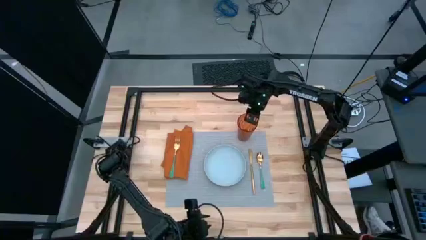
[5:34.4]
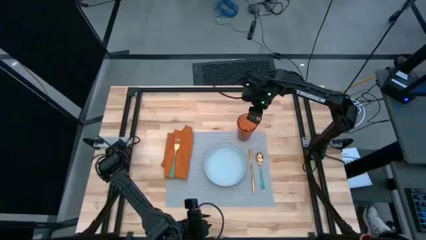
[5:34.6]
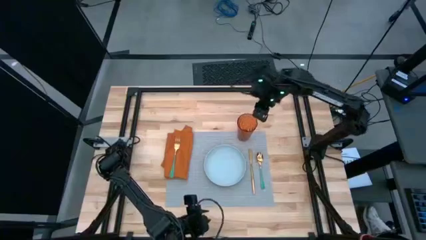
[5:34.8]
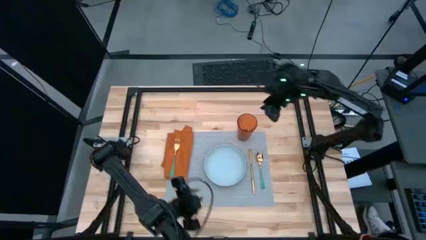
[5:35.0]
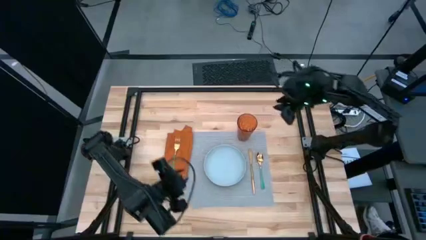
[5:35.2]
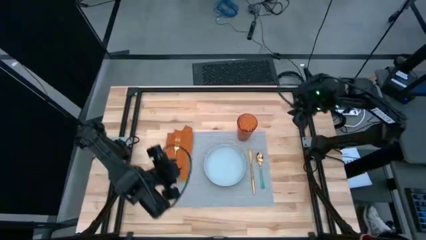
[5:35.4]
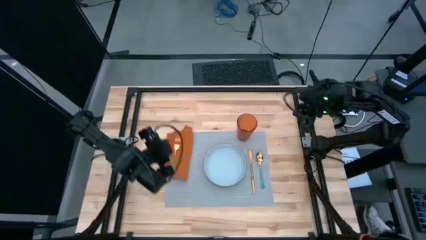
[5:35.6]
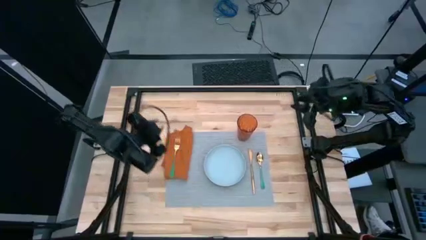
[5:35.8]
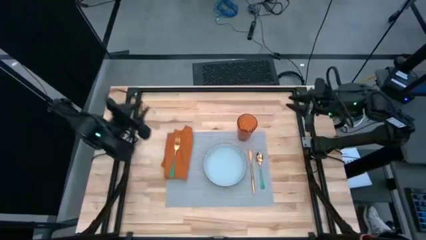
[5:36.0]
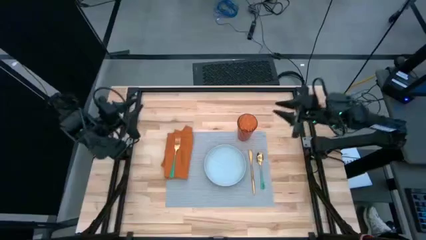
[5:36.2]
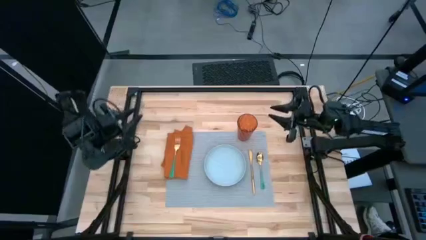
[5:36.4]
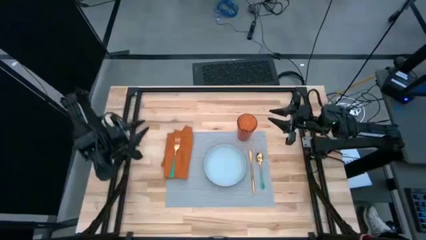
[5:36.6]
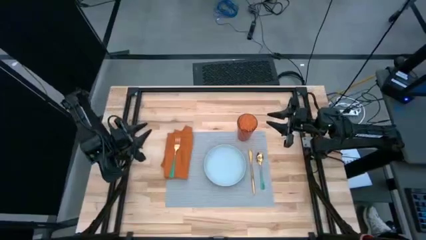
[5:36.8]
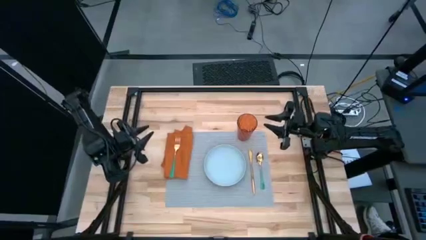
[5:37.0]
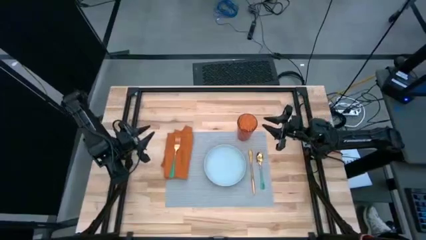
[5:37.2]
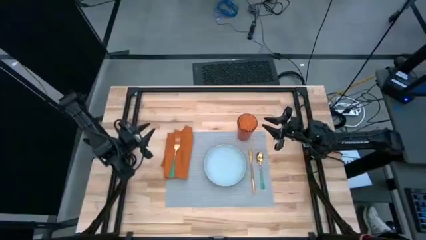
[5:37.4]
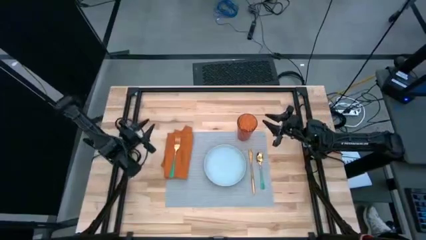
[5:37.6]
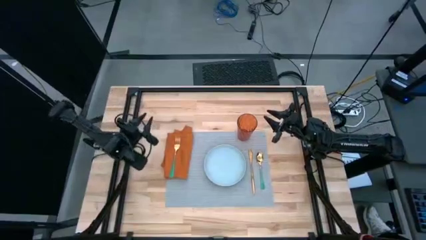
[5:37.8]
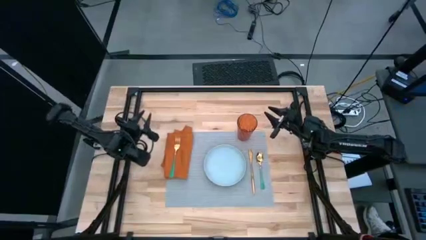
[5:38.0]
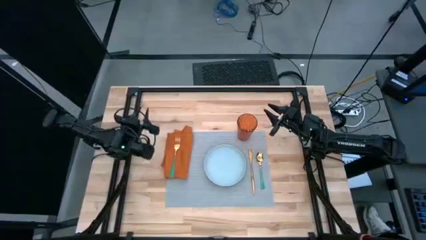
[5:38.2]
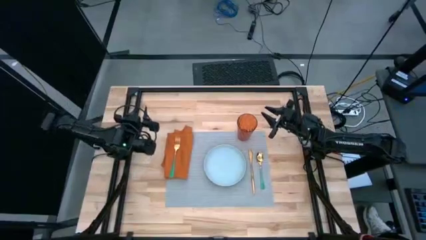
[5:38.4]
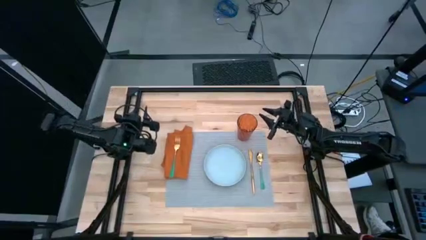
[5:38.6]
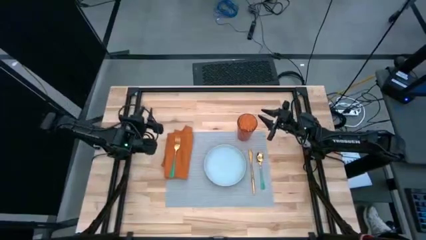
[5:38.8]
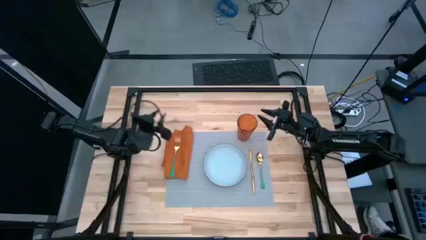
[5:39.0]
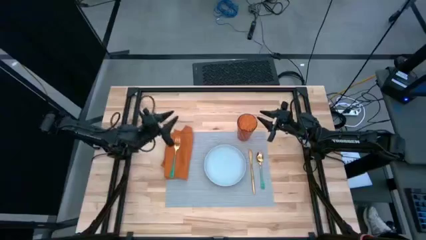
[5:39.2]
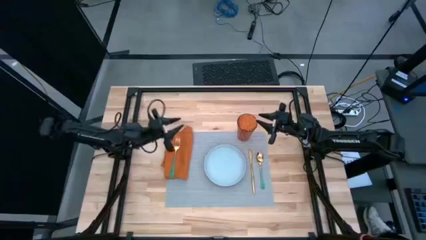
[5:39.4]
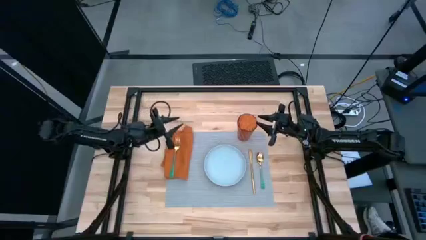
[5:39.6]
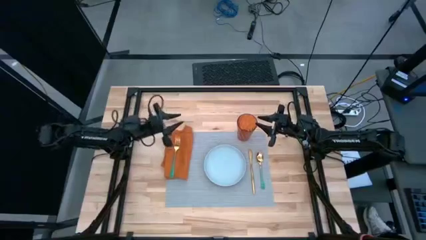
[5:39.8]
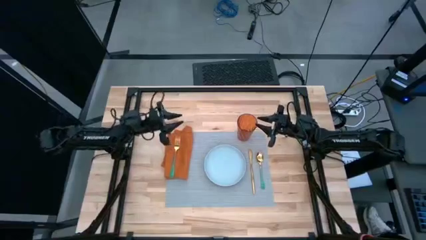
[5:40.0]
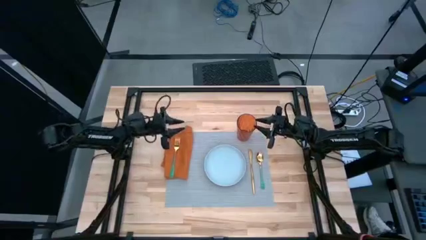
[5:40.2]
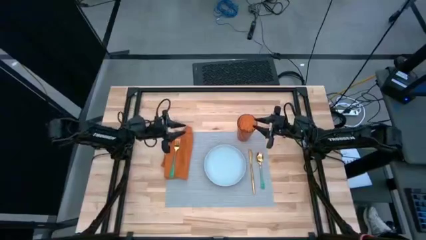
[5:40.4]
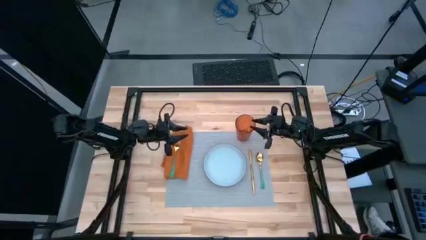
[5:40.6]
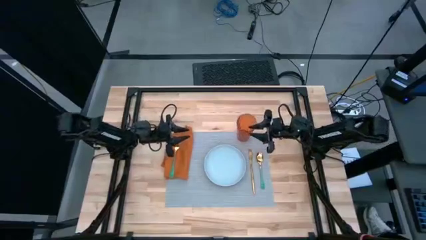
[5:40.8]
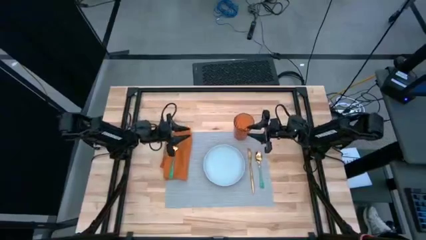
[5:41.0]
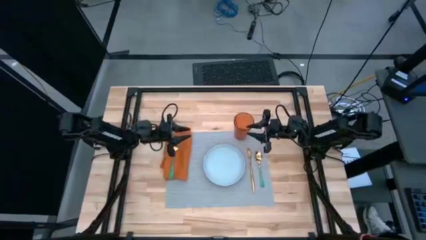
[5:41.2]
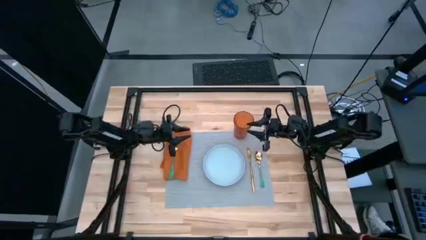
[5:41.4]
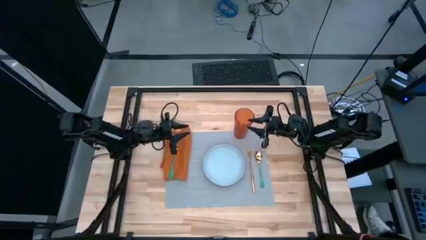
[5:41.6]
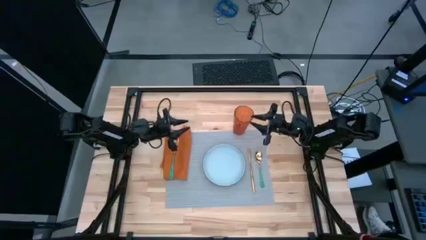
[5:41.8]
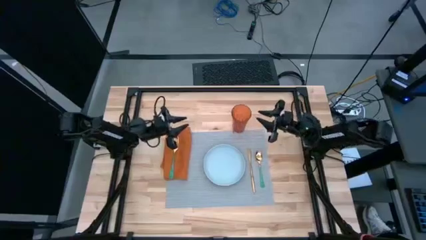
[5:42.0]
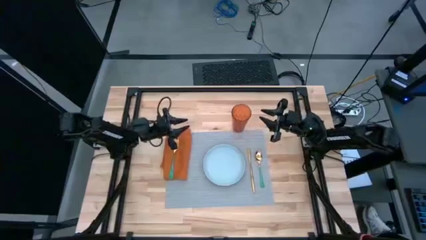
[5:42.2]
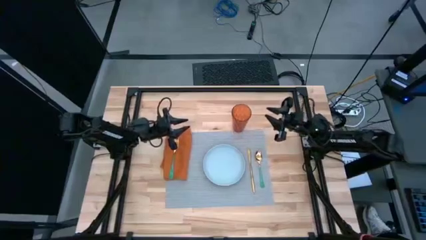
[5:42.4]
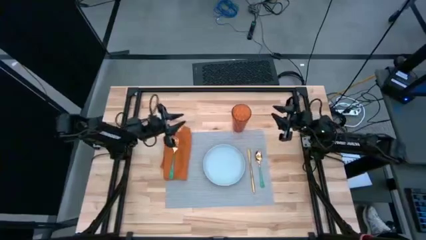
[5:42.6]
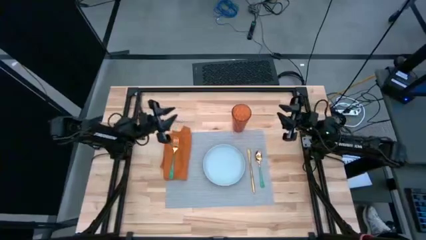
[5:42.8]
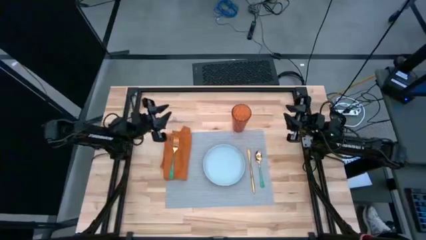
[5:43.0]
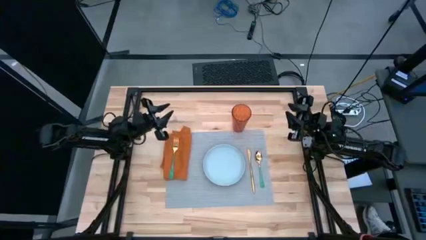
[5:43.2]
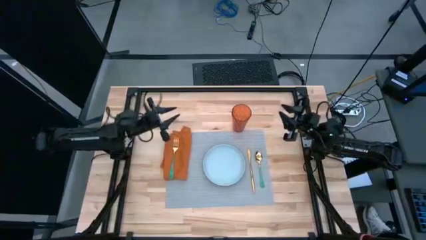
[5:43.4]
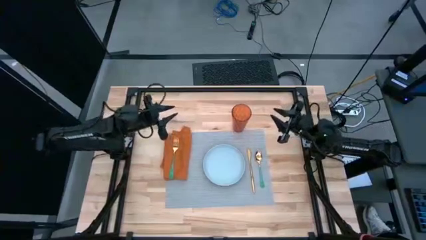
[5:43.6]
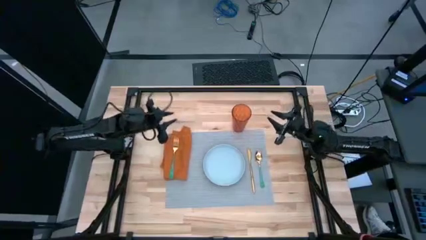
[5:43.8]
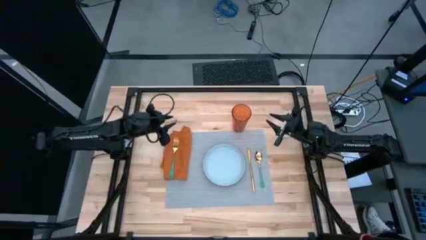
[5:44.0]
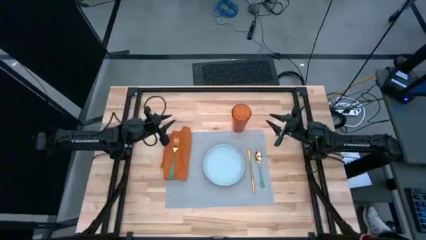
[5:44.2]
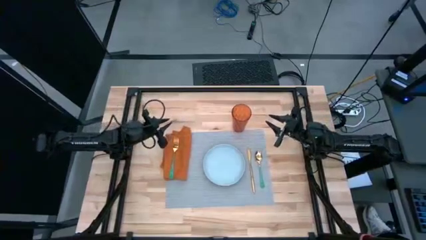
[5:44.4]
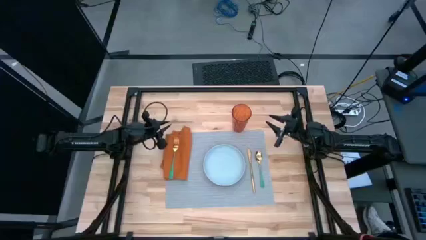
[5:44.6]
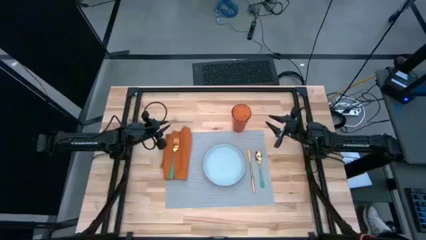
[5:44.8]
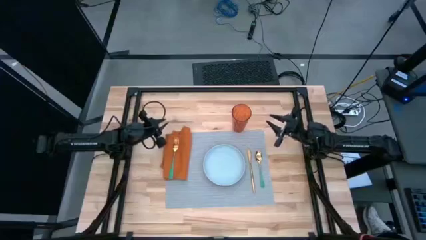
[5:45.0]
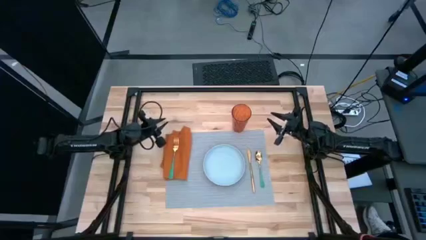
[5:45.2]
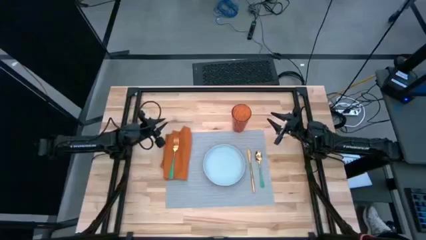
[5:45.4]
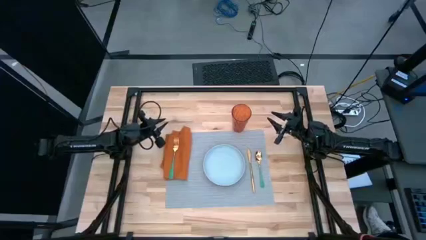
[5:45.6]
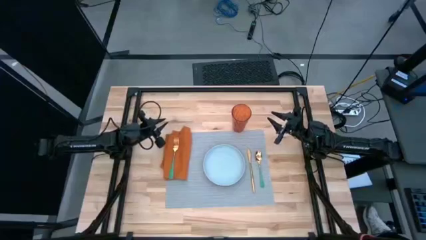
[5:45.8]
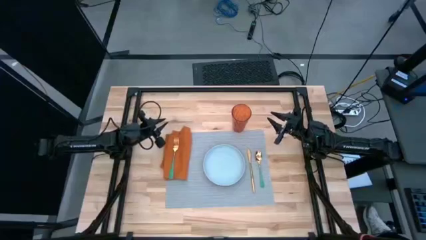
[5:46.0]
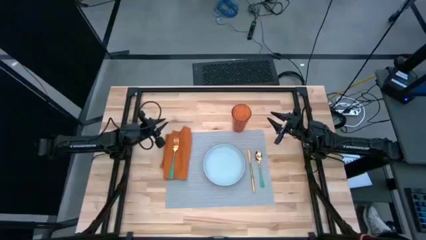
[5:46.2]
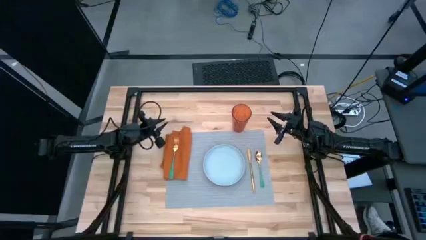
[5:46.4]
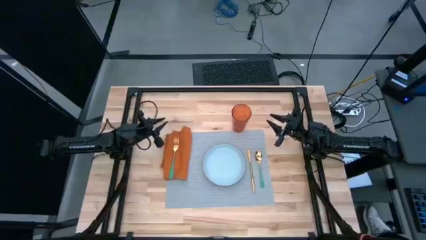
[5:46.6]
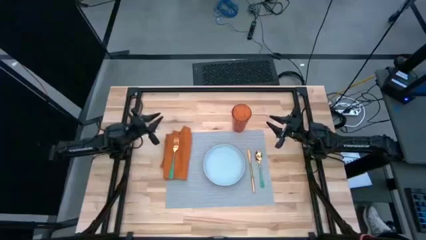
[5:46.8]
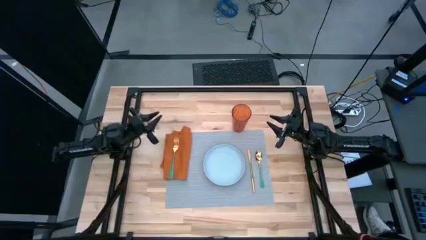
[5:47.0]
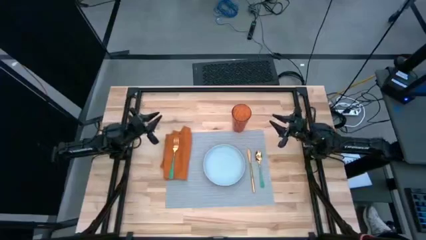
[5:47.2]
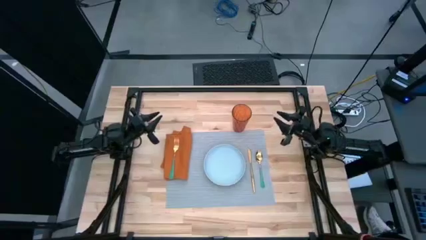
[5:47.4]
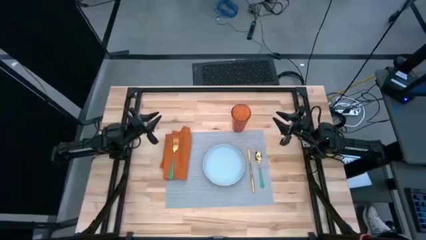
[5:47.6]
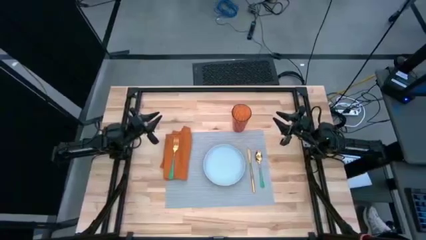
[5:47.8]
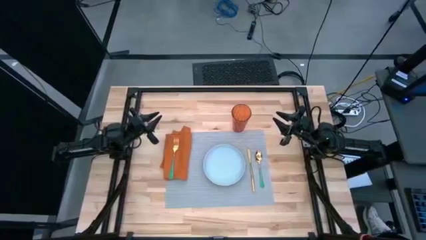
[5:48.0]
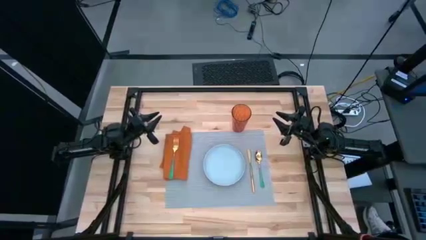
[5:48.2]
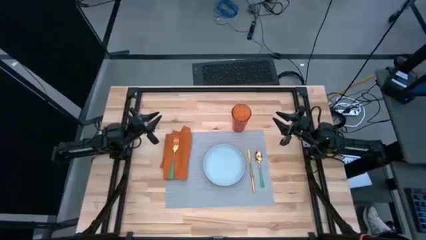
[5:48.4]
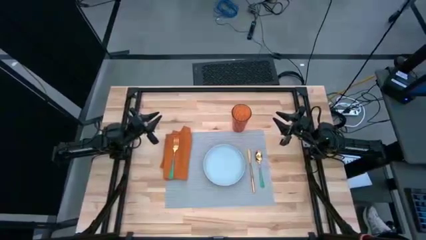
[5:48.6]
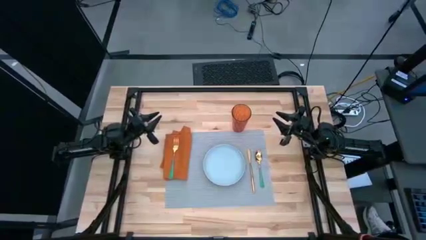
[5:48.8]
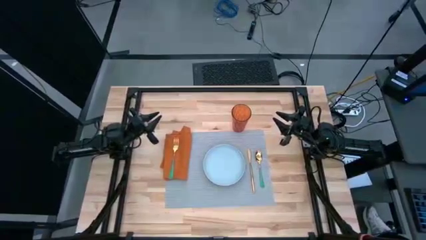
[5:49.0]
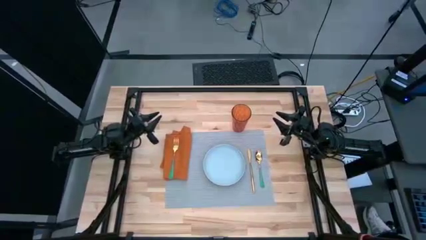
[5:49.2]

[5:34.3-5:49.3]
Task: Set table place
Return to Home Position

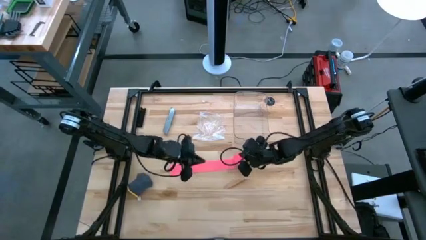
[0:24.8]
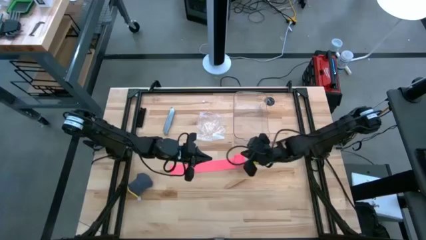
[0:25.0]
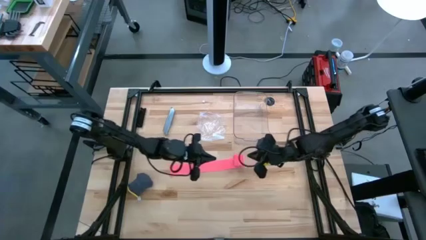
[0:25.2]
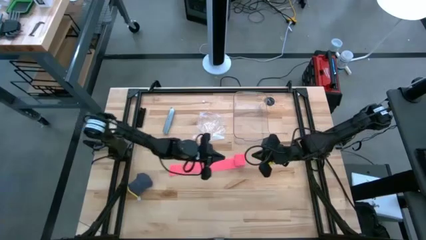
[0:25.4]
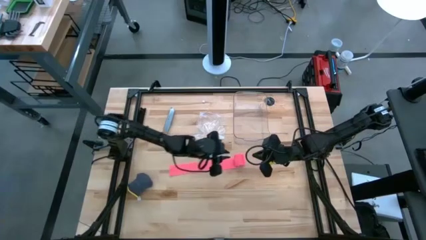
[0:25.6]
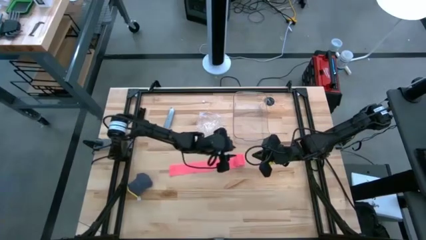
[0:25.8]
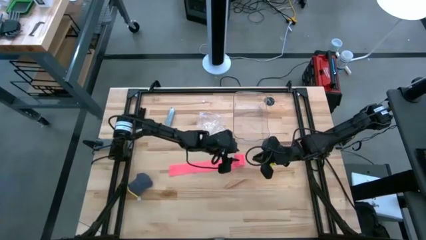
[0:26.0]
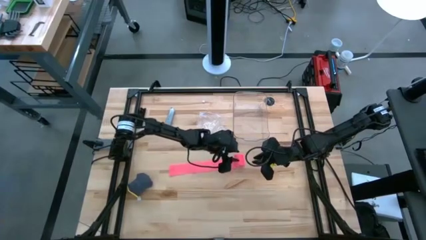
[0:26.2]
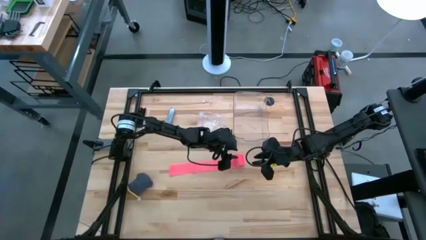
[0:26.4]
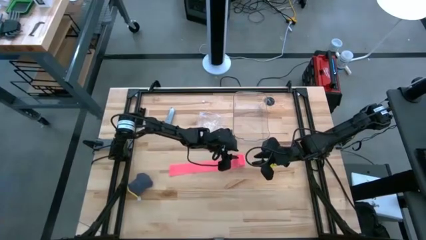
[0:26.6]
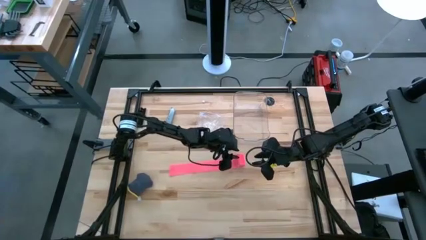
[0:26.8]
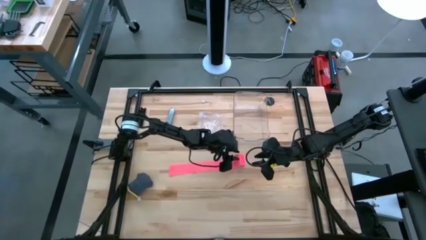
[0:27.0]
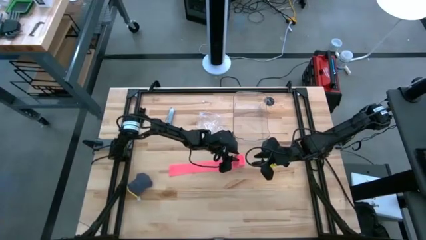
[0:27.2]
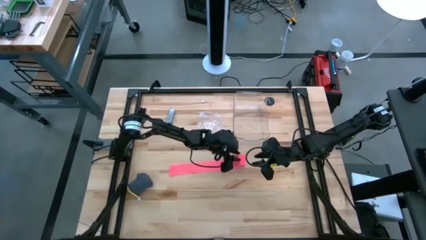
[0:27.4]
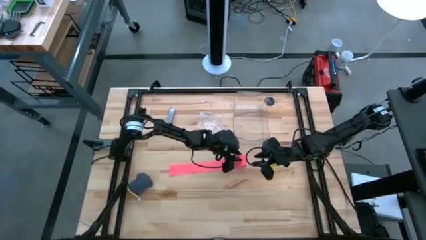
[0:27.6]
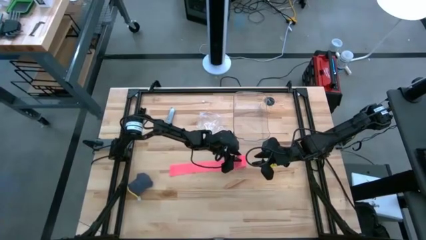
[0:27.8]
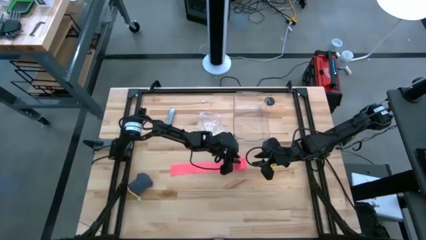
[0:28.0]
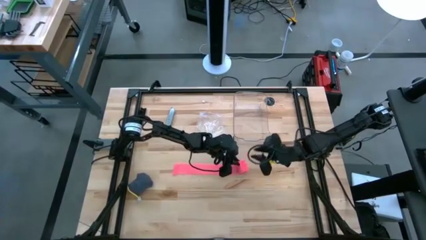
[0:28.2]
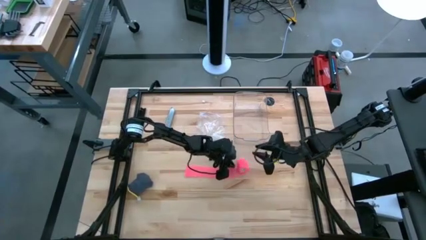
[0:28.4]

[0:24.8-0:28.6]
Task: Roll bandage
Roll the pink bandage
